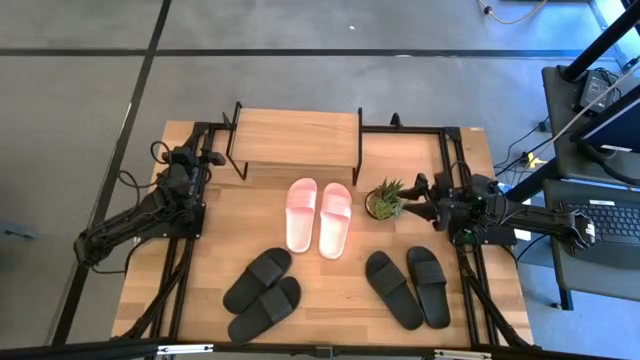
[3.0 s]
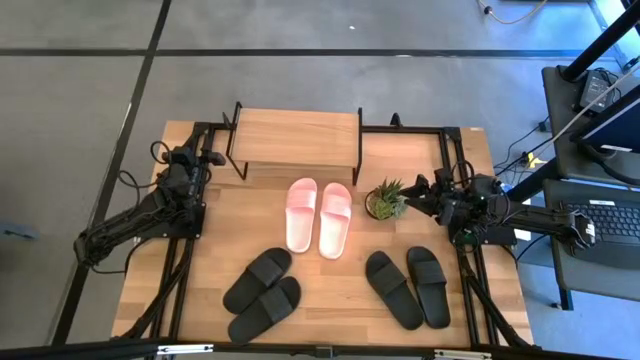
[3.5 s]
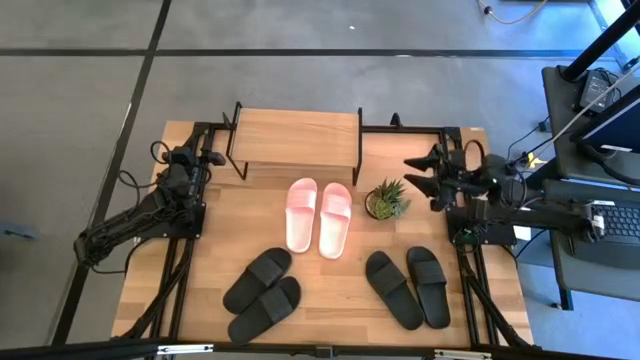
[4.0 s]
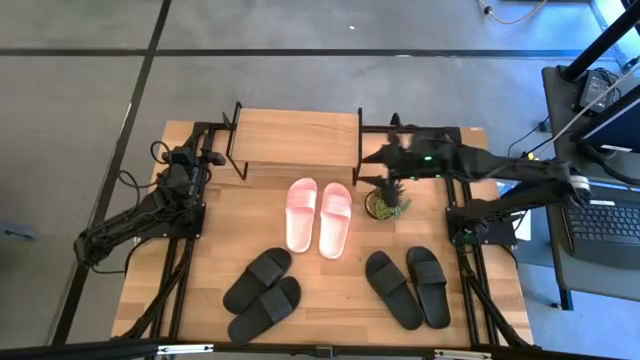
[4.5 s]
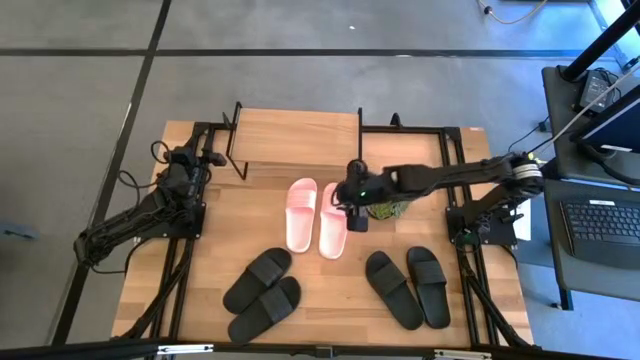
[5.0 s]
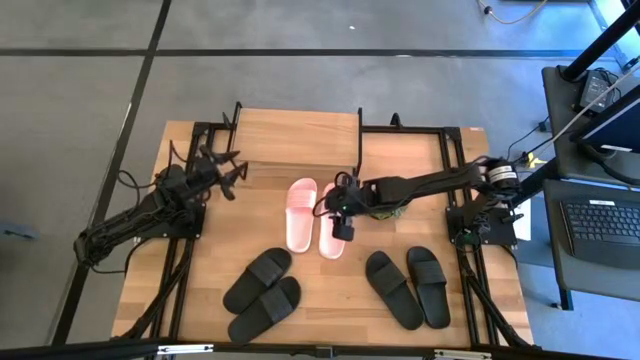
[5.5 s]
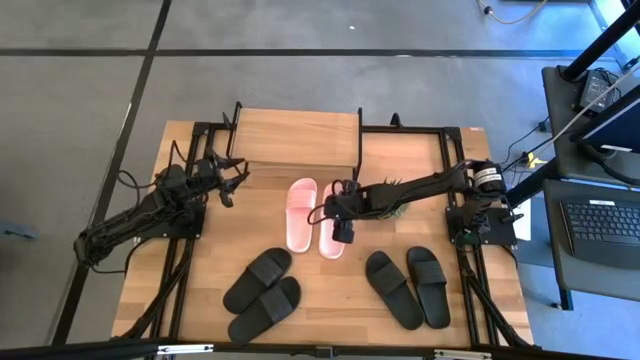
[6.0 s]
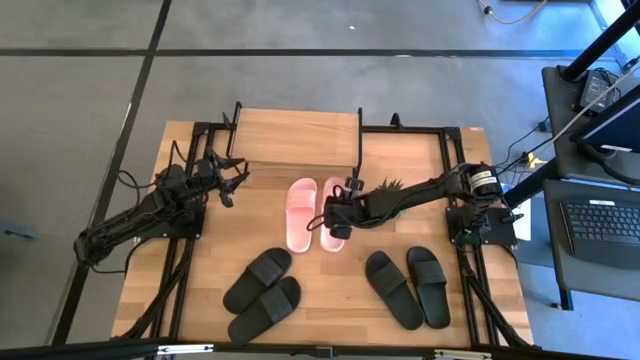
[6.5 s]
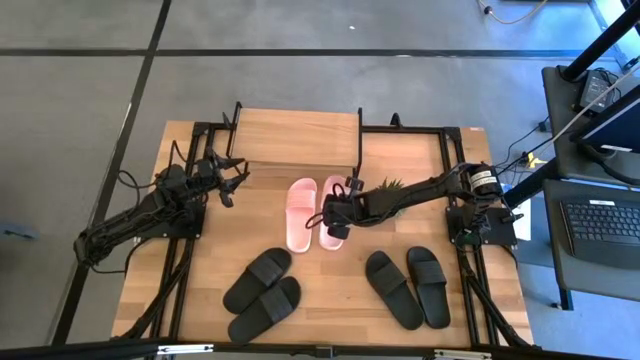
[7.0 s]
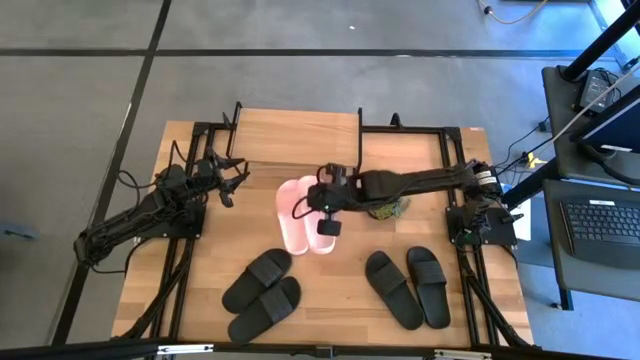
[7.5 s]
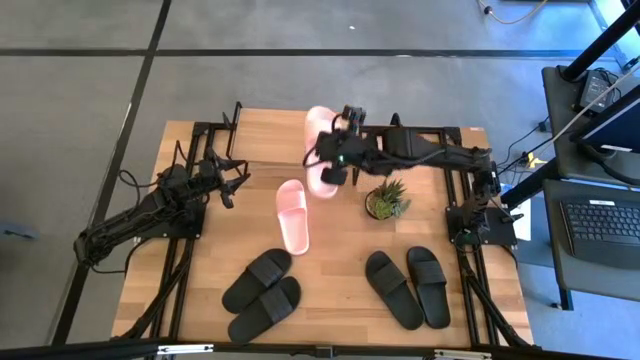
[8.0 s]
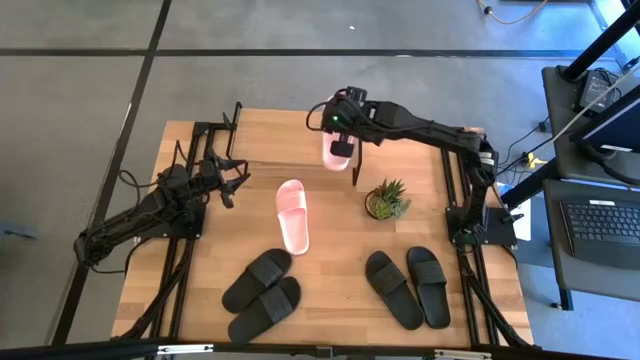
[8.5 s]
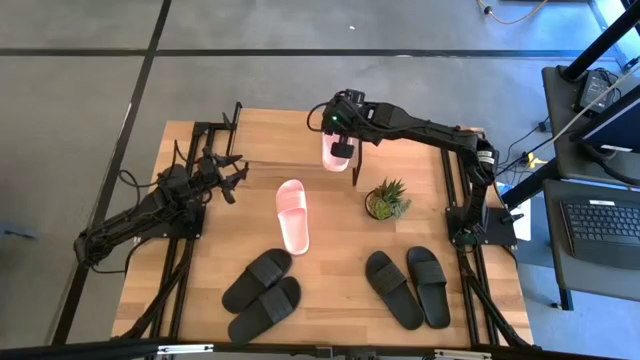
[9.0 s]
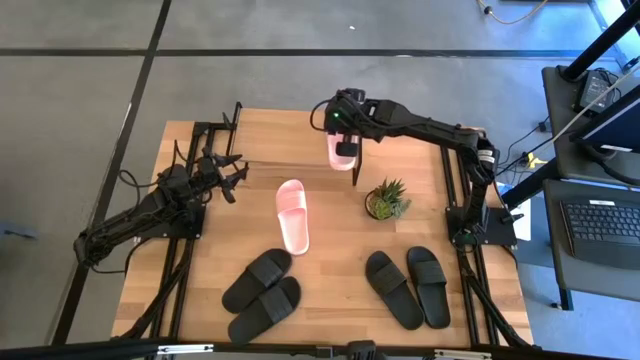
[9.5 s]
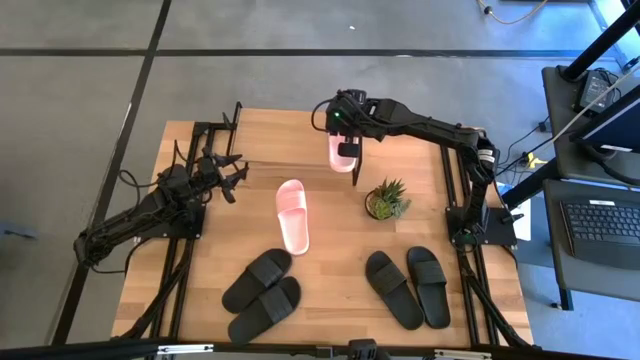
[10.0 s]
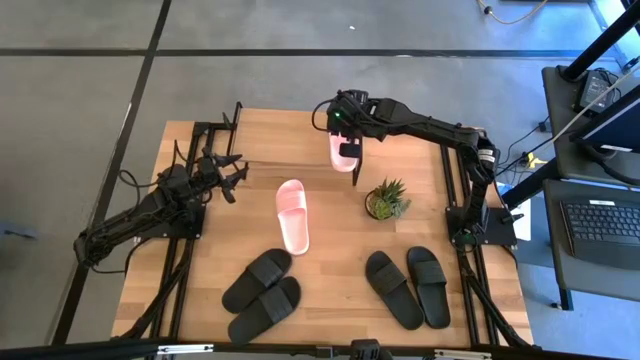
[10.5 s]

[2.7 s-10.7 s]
Task: Pick and place slides into the shelf
Put the left pink slide on the shelf

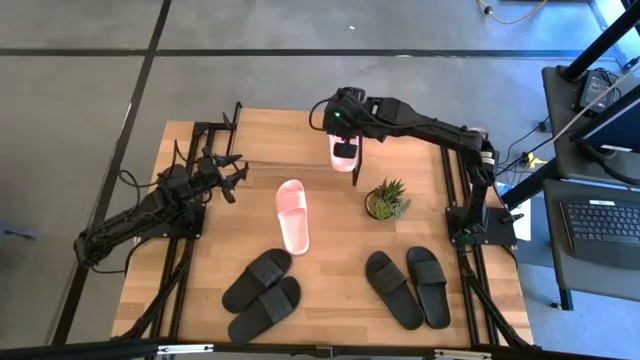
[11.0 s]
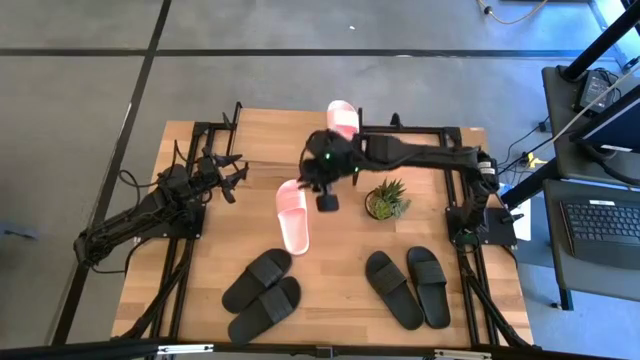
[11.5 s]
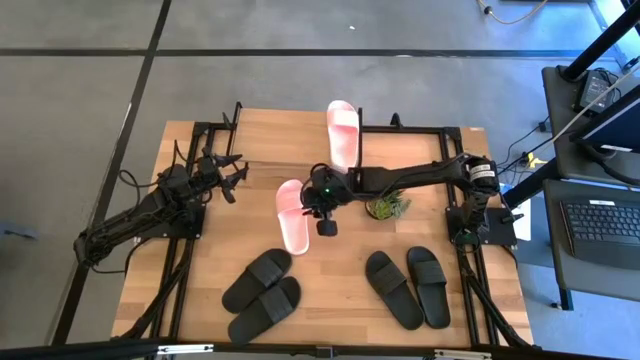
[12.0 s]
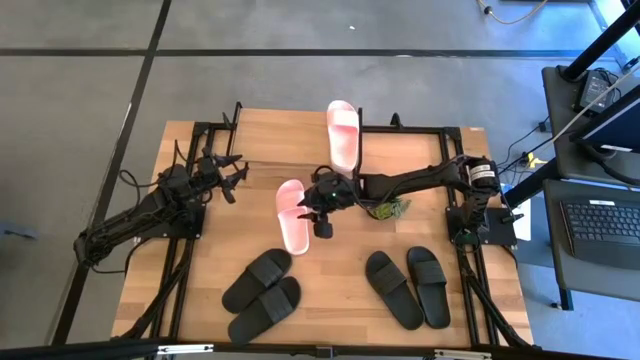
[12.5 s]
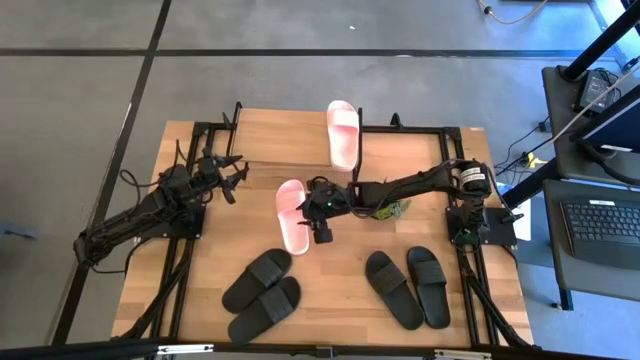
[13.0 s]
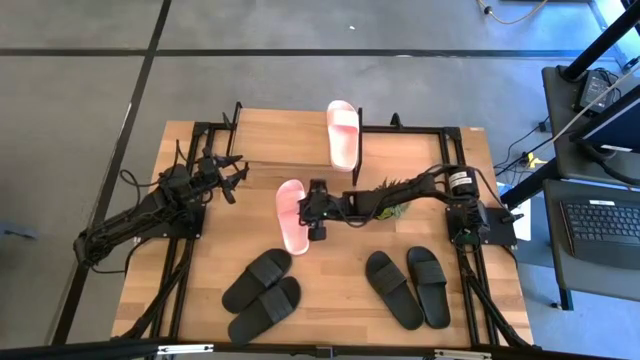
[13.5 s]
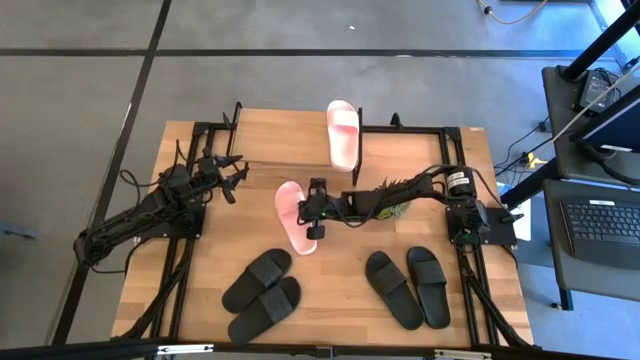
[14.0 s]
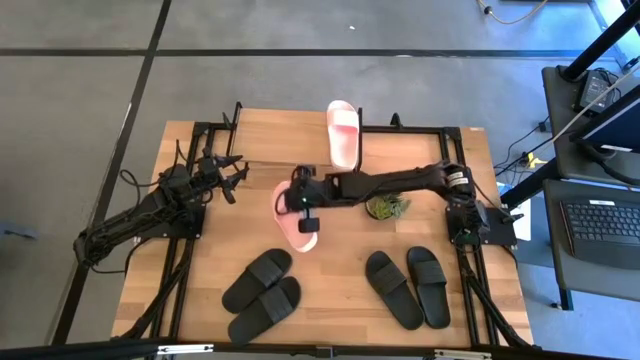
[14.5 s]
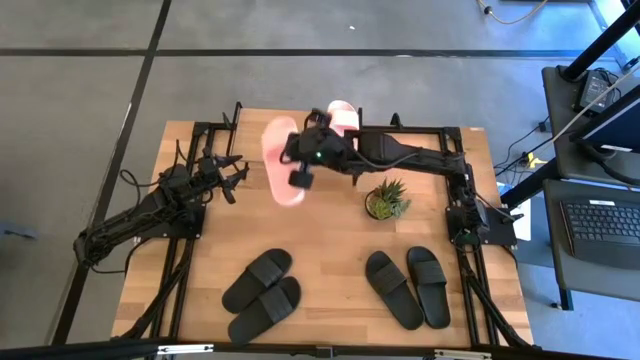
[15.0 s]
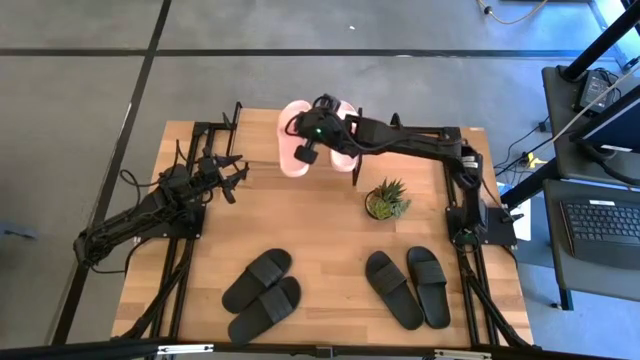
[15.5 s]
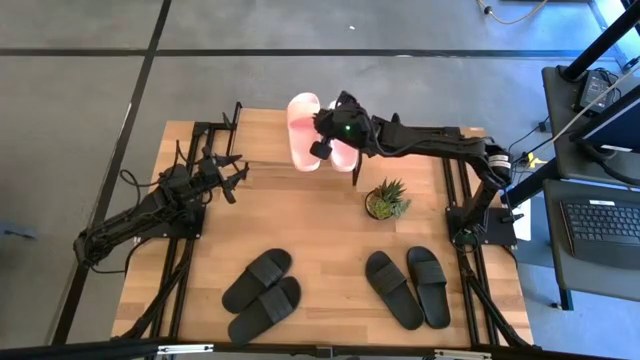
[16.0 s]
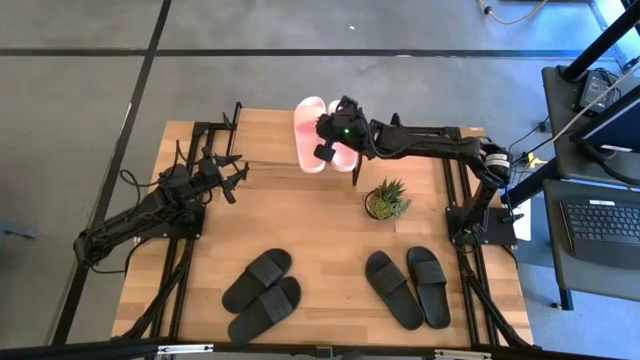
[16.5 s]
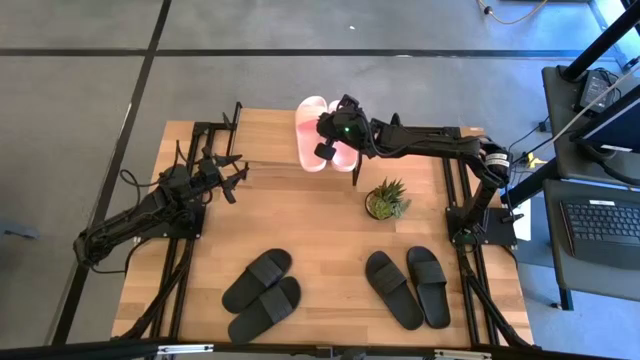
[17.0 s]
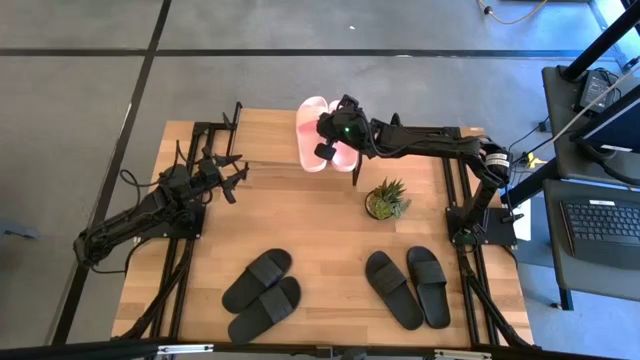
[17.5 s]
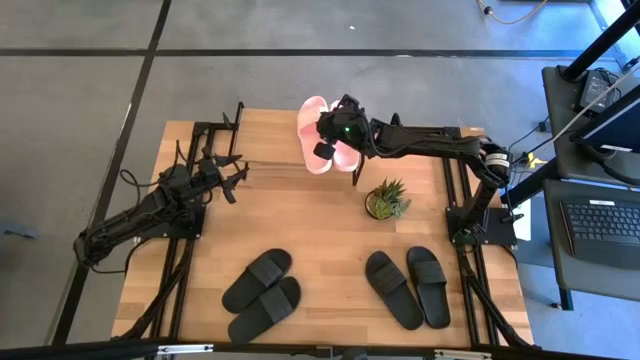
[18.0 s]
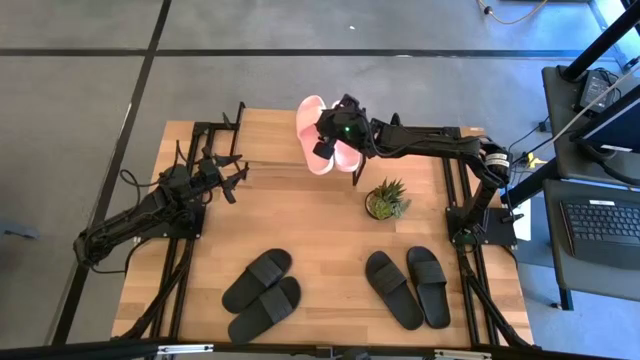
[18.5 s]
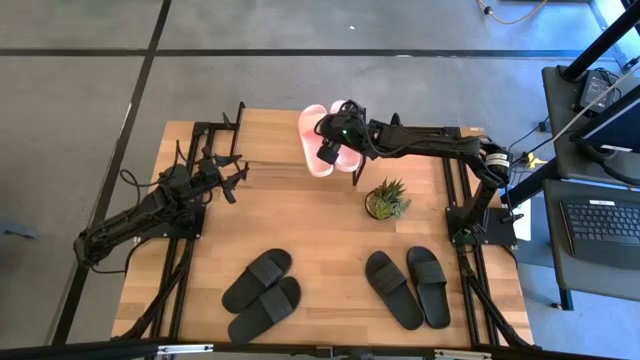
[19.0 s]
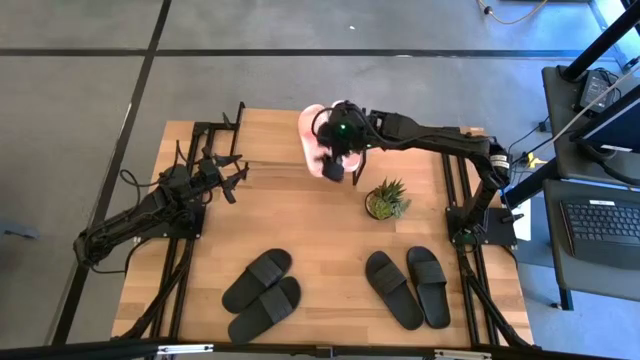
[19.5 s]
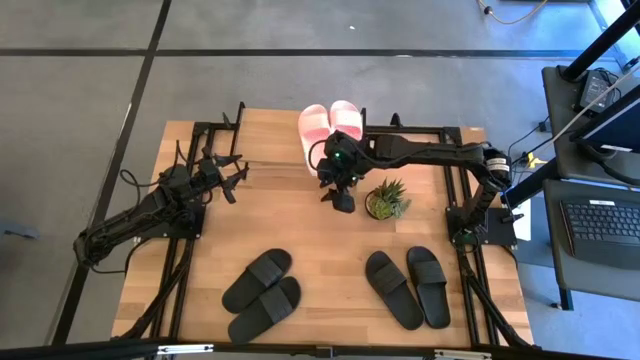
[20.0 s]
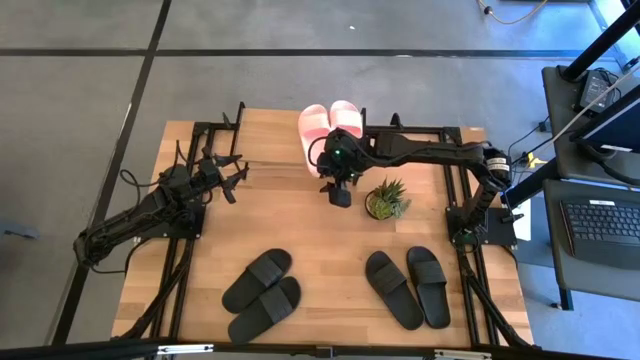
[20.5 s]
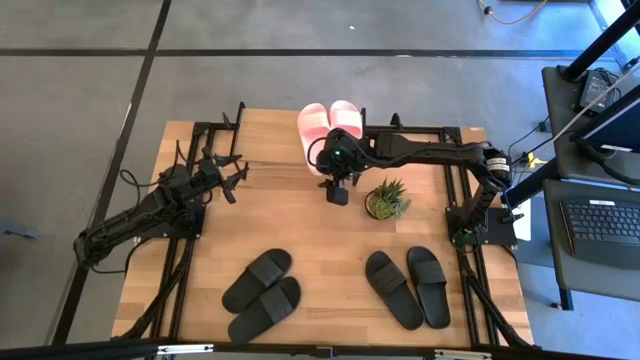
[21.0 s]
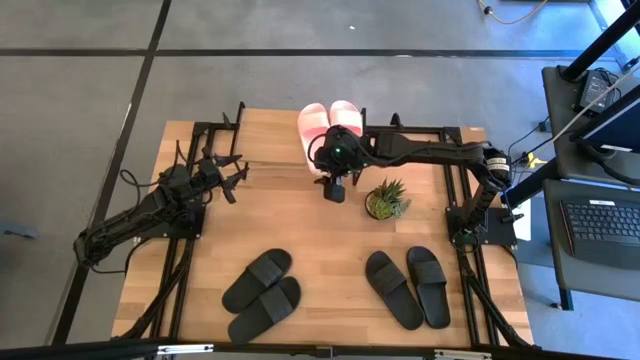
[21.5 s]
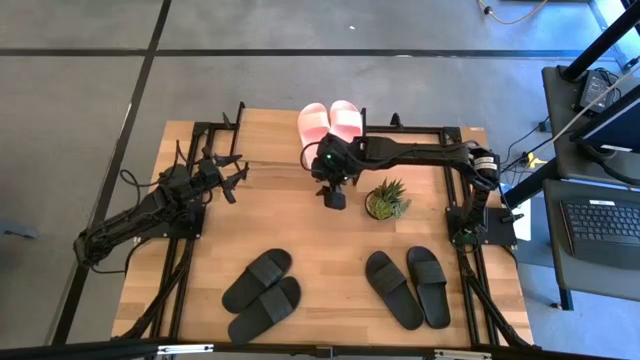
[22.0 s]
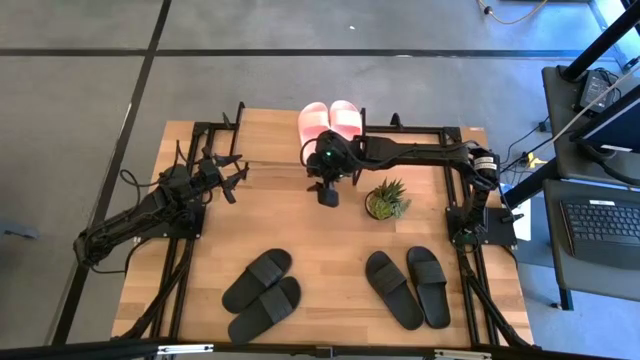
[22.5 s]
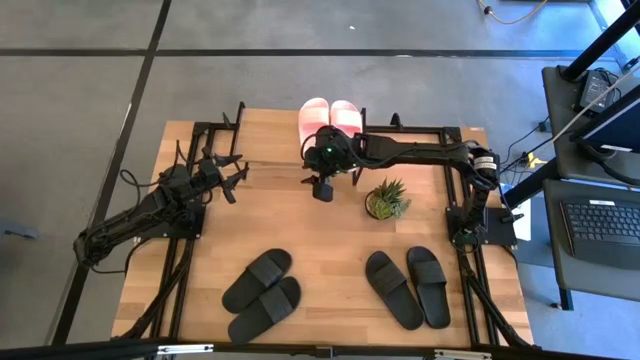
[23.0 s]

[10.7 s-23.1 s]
Put the pink slide on the shelf
